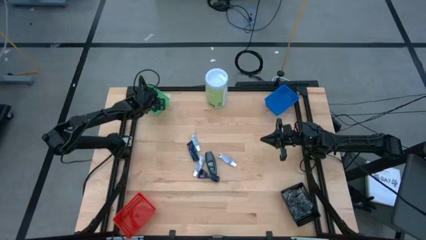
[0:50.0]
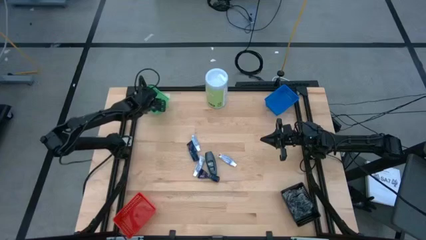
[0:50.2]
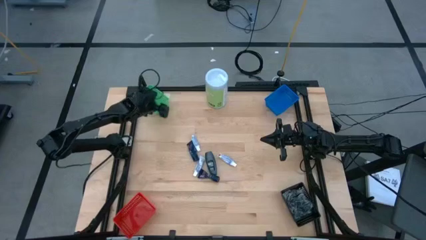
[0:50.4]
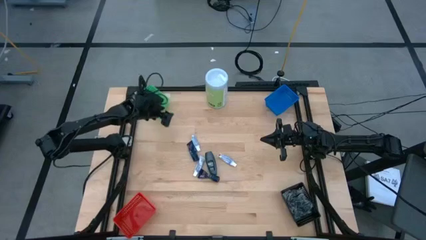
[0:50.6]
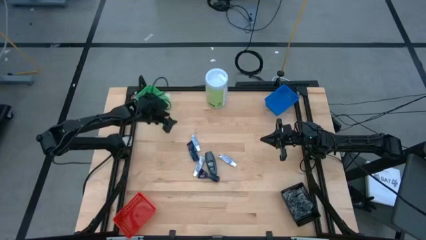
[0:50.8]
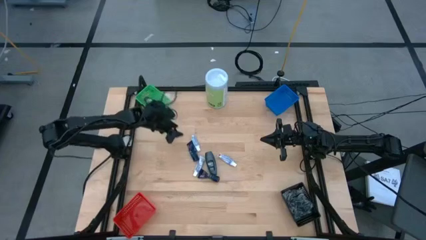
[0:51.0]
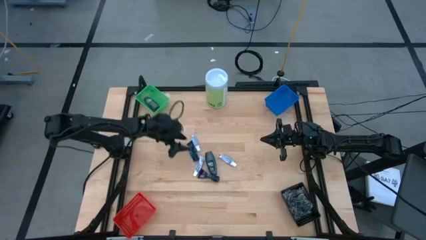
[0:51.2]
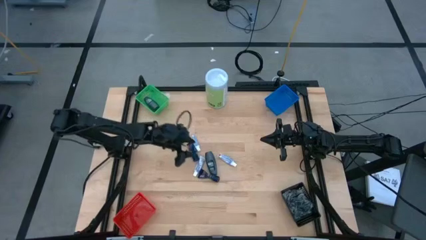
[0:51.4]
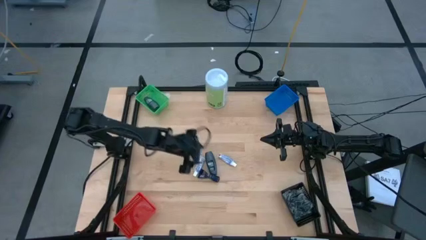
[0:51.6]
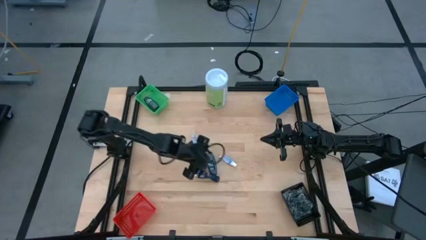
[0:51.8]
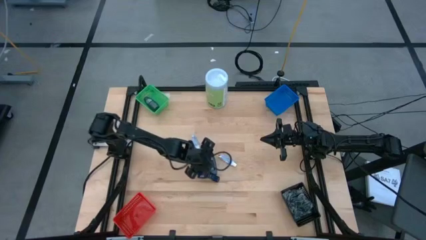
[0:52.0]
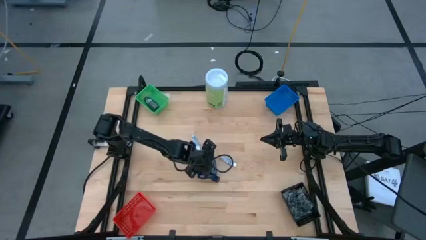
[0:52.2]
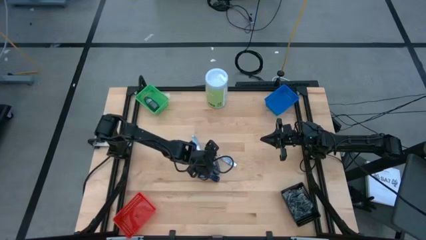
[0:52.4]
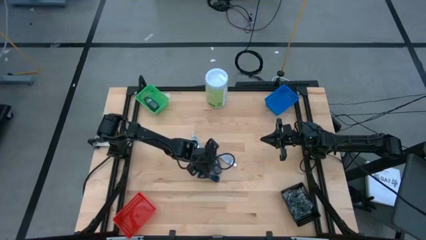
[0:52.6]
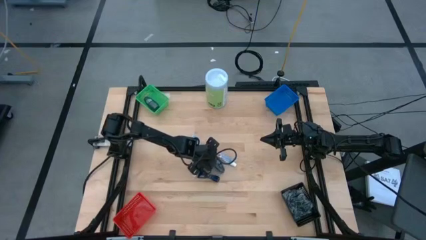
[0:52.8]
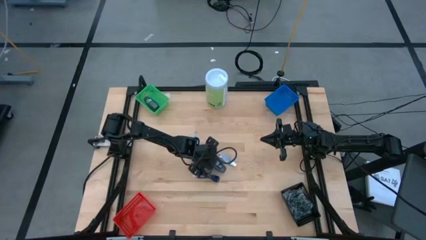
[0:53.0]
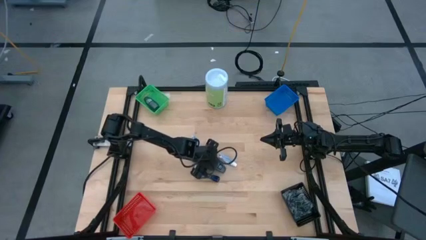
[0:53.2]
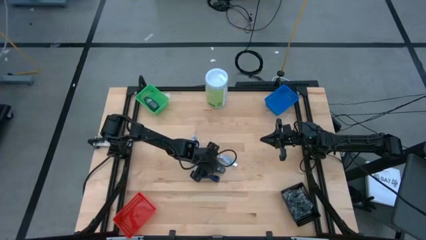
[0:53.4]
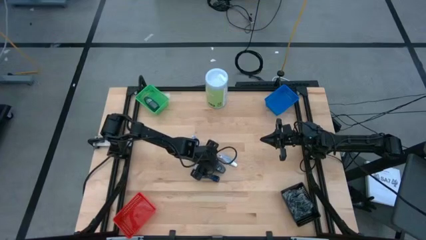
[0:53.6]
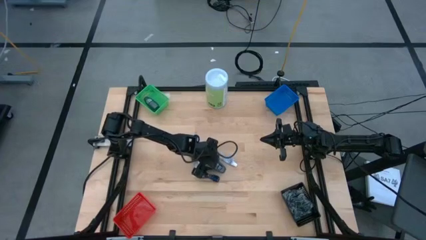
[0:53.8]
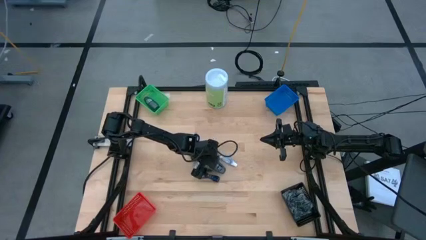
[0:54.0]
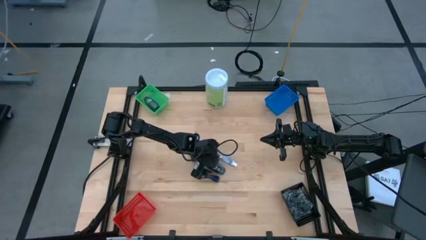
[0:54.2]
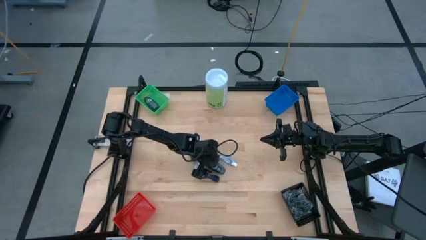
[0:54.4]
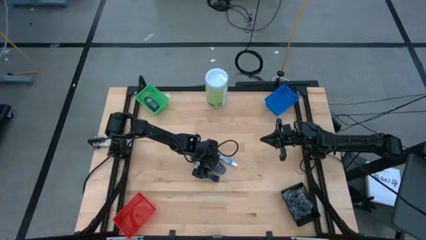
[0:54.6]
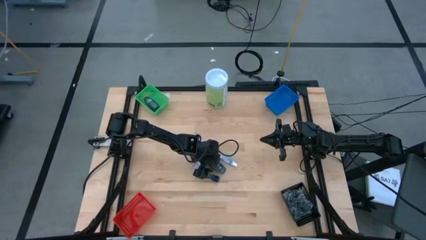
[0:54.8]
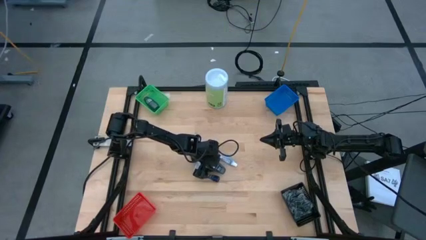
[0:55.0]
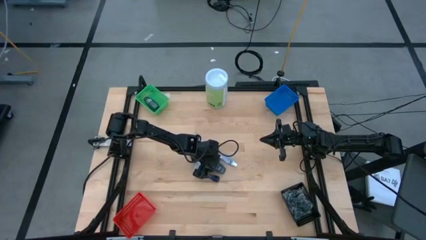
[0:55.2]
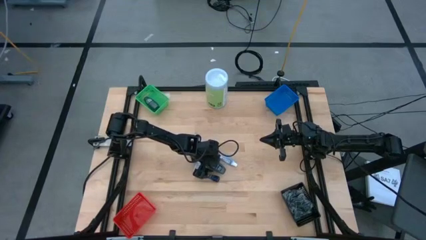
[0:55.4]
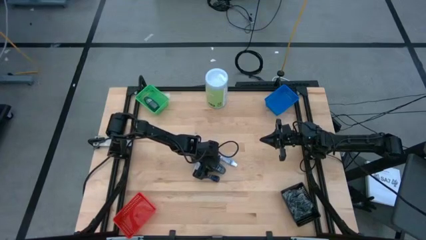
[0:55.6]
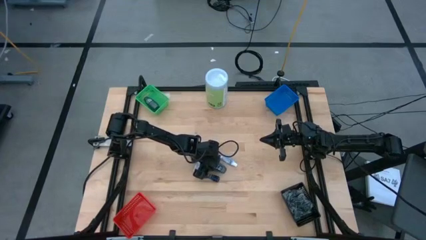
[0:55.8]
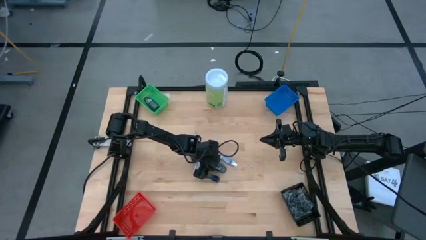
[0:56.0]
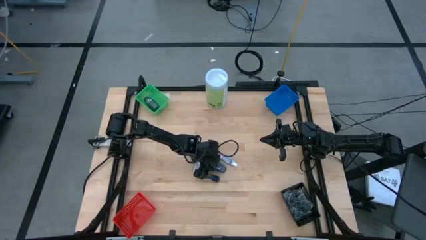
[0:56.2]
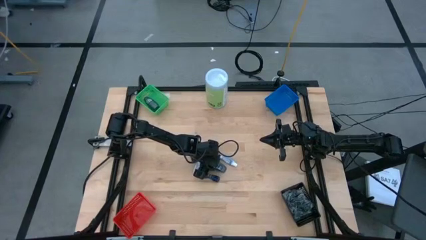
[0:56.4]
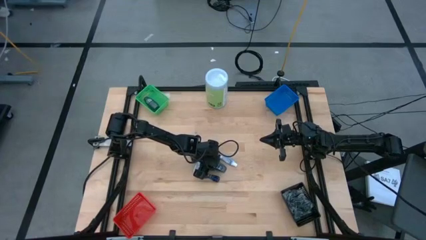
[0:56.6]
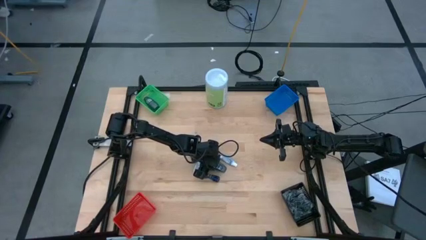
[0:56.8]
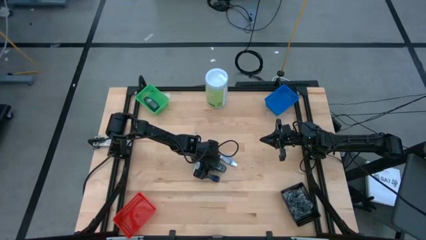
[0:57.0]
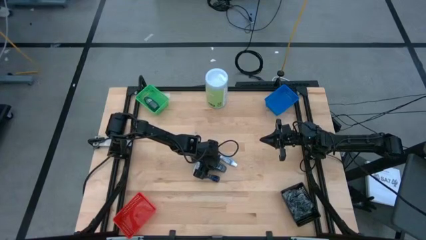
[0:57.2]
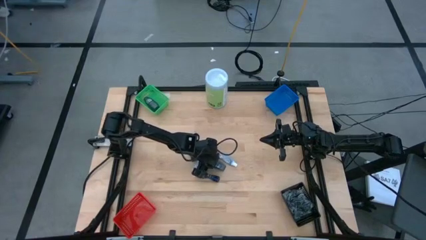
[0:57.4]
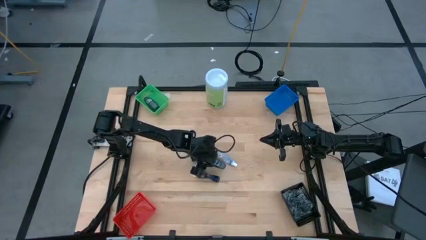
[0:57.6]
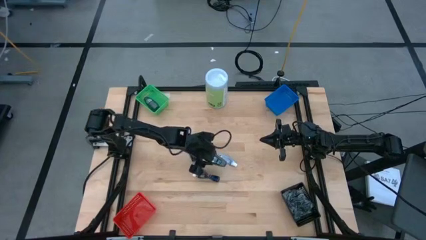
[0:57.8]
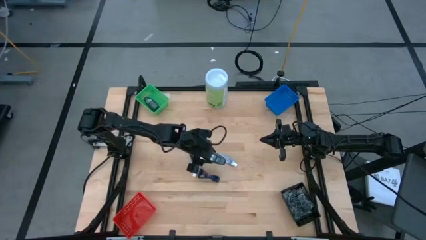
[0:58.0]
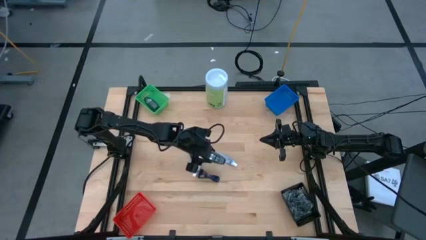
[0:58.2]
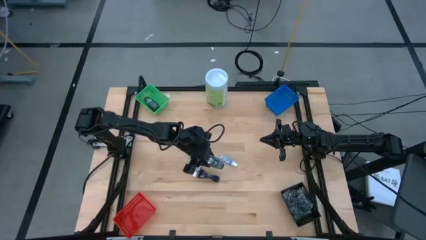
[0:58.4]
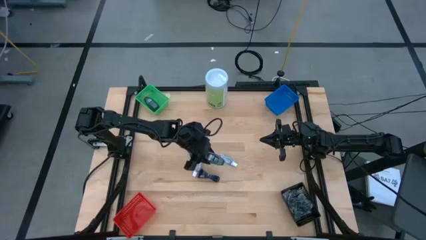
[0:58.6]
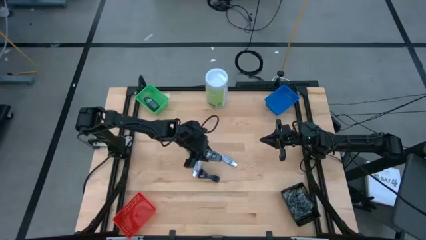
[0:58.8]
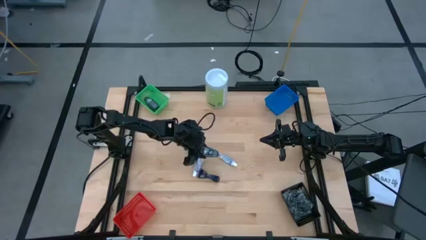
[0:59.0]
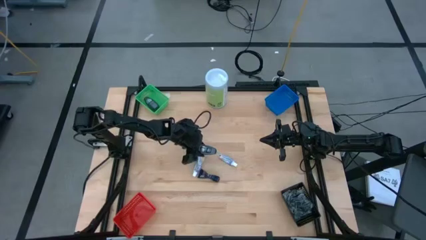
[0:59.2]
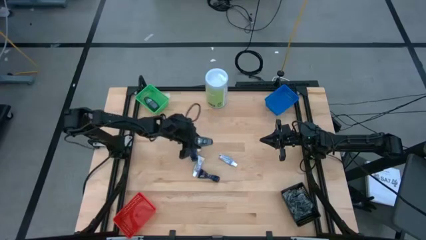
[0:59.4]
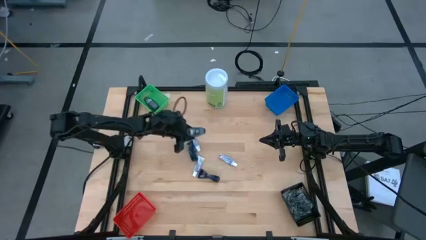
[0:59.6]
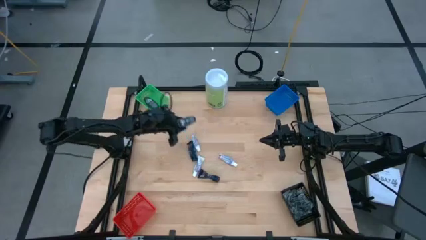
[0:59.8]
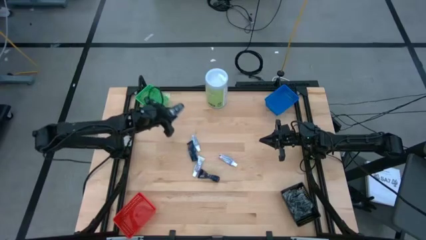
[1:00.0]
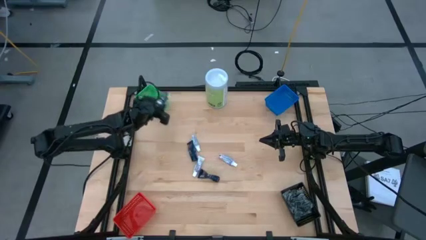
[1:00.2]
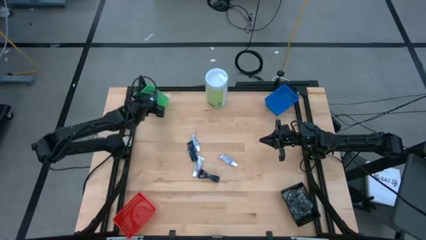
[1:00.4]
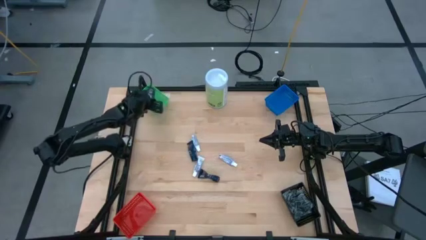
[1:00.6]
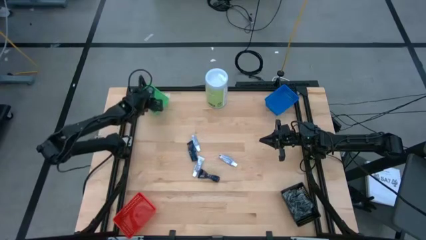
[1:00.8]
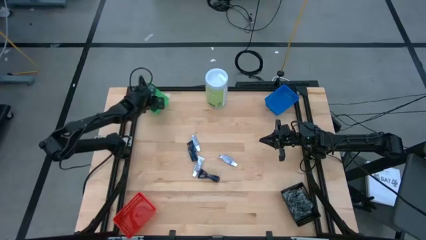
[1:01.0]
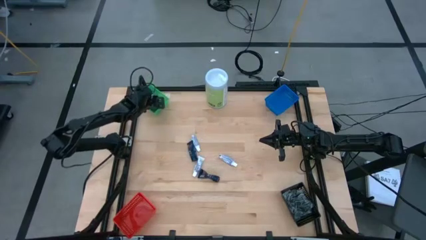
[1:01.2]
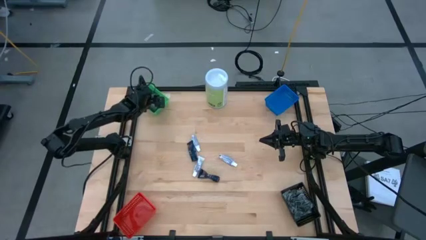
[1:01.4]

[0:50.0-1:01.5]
Task: Pick & Place Travel size toiletries
Put the black deodorant into the green bin
